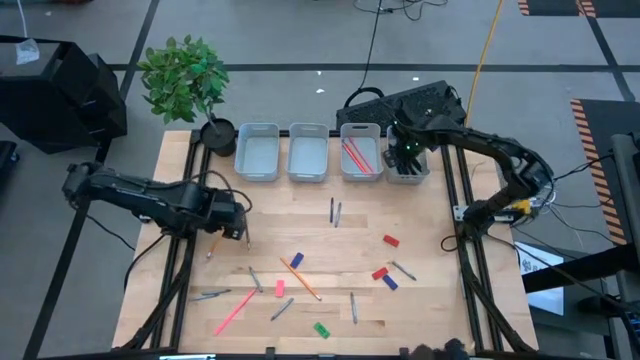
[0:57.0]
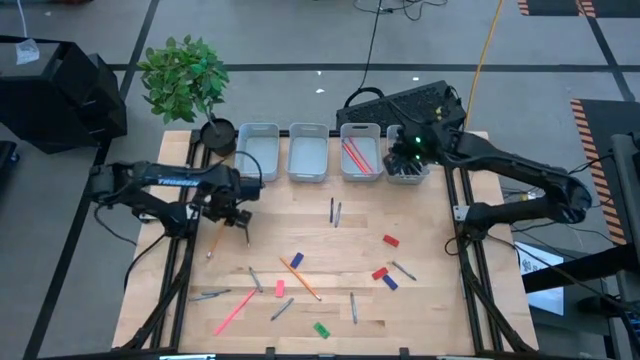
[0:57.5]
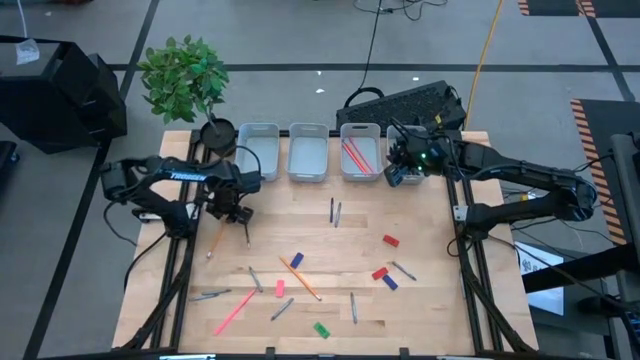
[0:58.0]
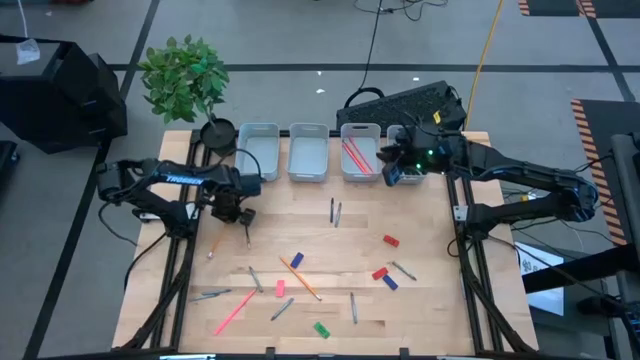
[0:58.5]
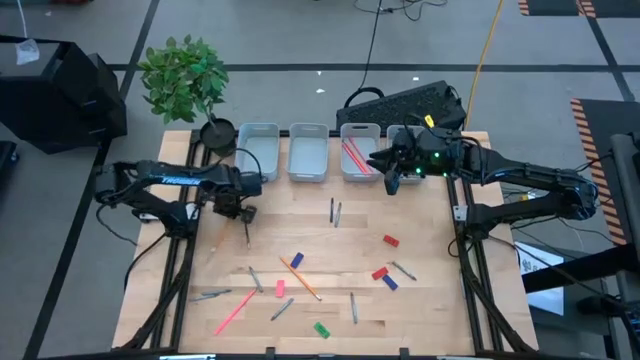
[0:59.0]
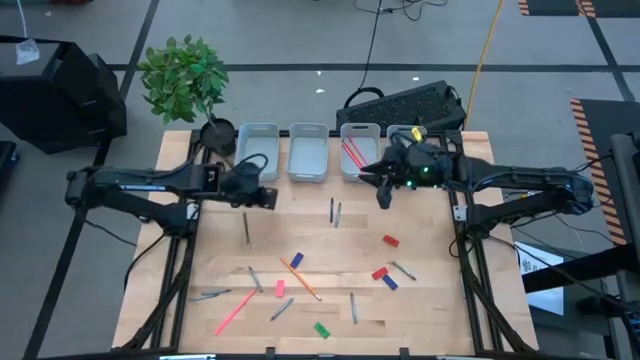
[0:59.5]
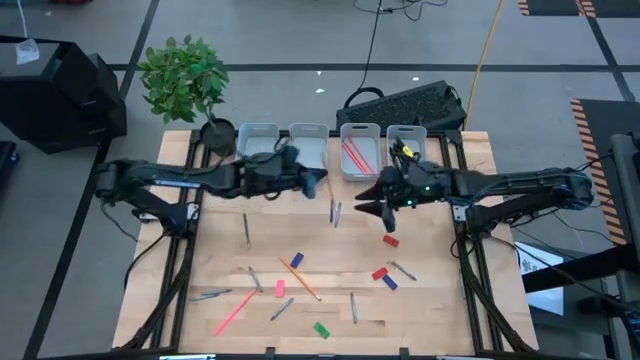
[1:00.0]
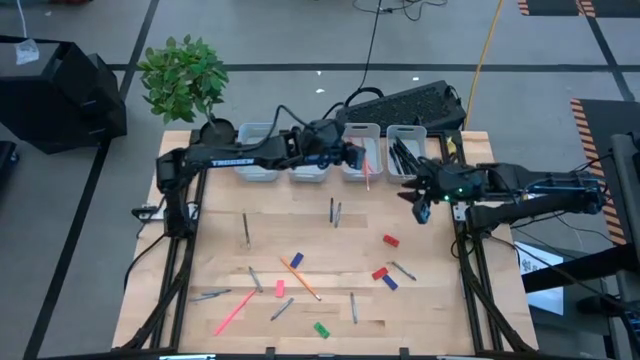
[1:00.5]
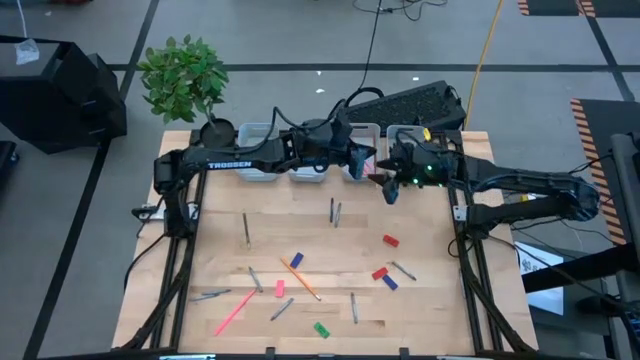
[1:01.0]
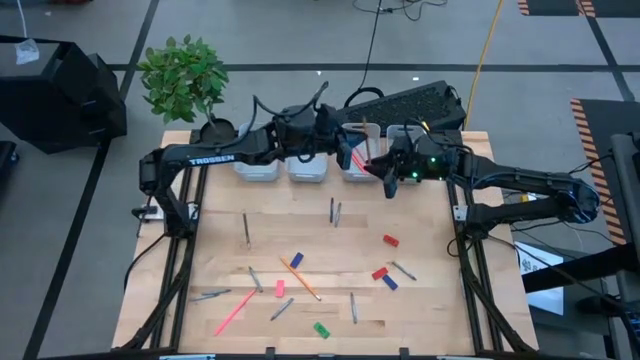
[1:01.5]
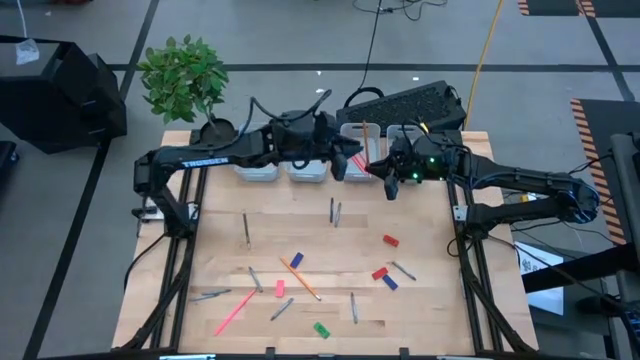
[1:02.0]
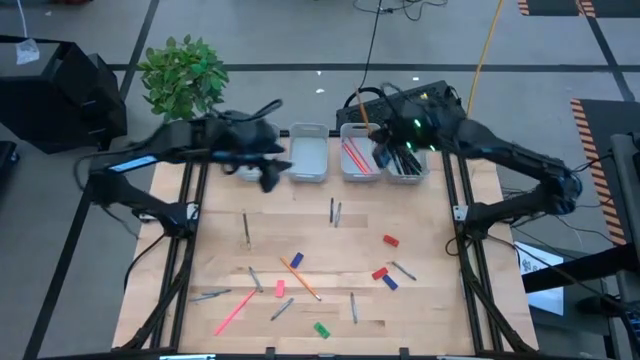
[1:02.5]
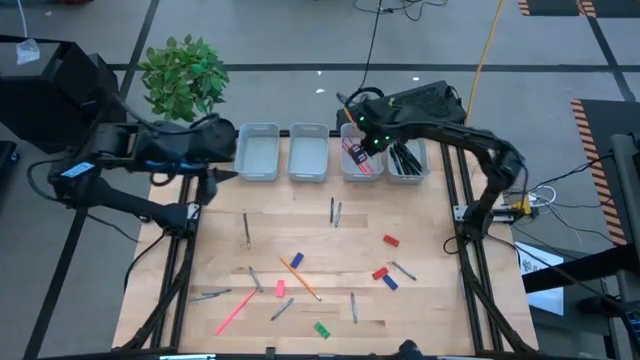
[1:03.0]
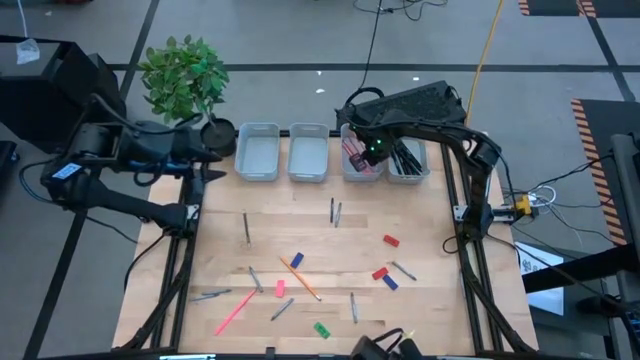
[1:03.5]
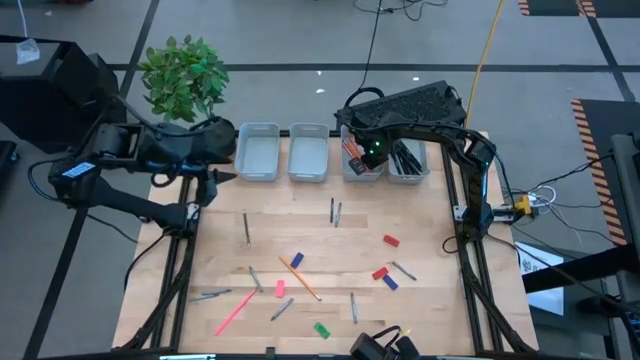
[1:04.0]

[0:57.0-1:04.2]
Task: Sort crayons/erasers/pens/pencils in bins
Put the orange pencil into the middle right gray bin

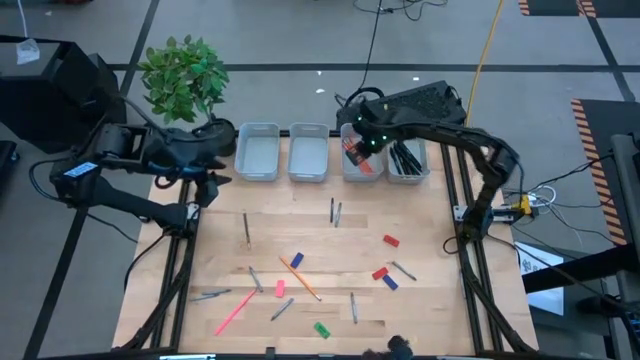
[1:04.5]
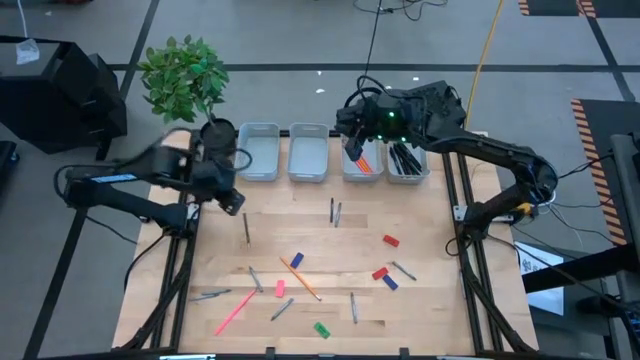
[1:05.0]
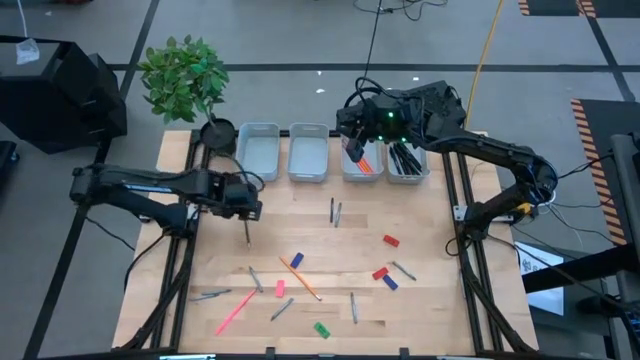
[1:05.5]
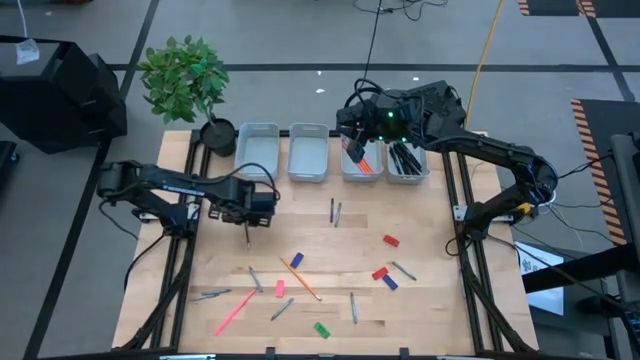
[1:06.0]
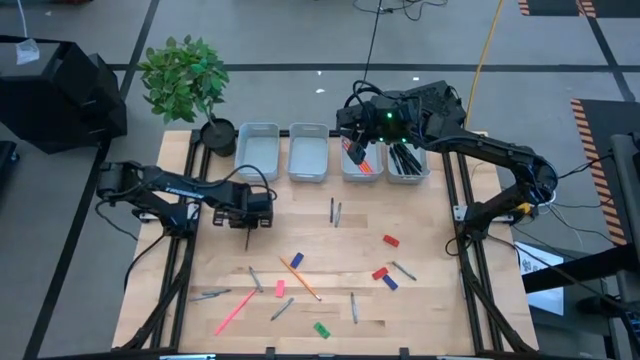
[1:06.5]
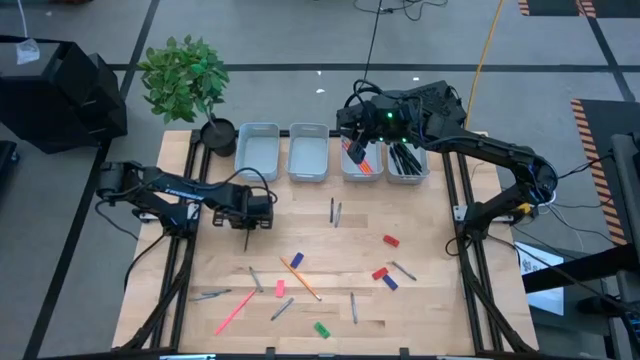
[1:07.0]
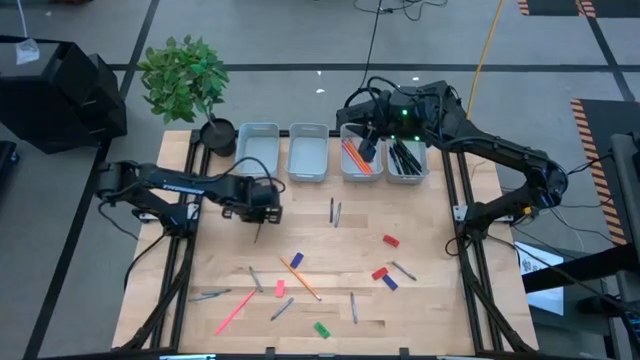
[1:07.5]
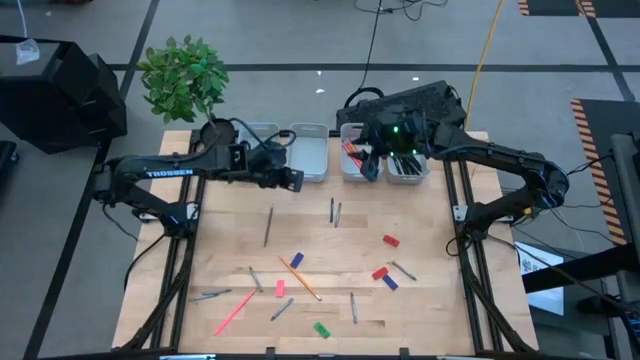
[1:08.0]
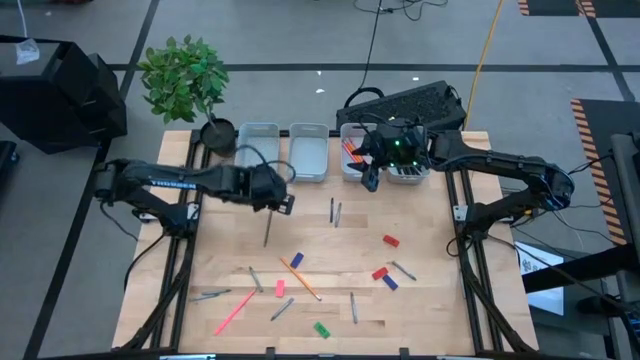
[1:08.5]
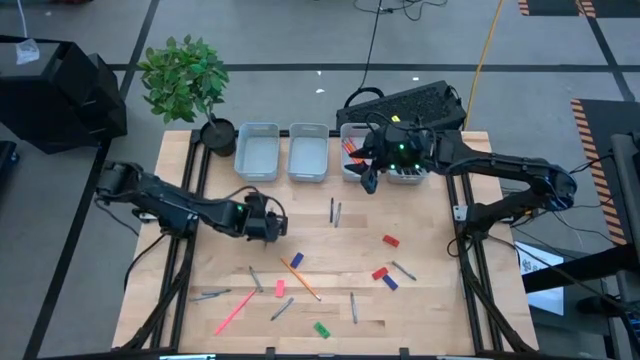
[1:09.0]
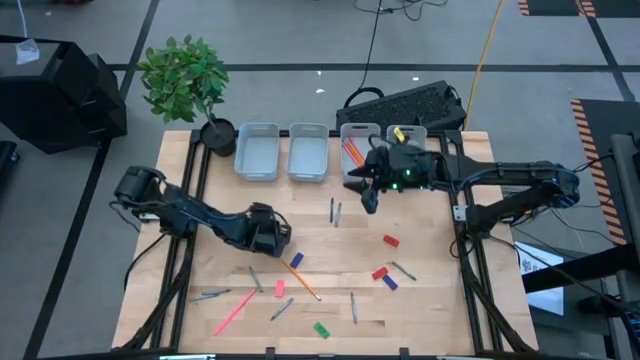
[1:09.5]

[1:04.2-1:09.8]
Put the black pencil into the middle right gray bin

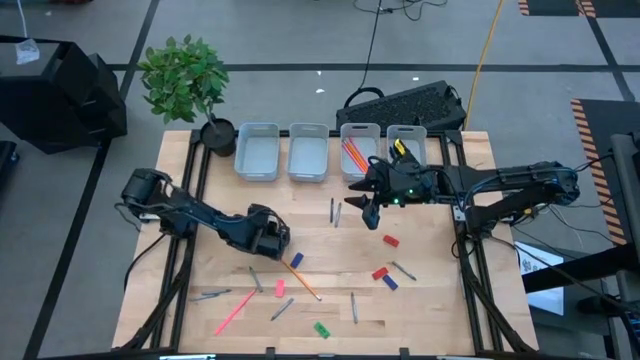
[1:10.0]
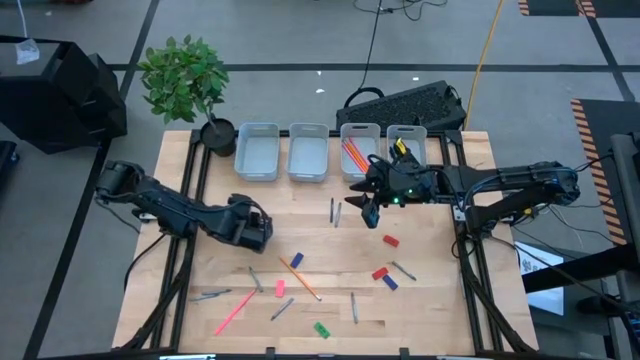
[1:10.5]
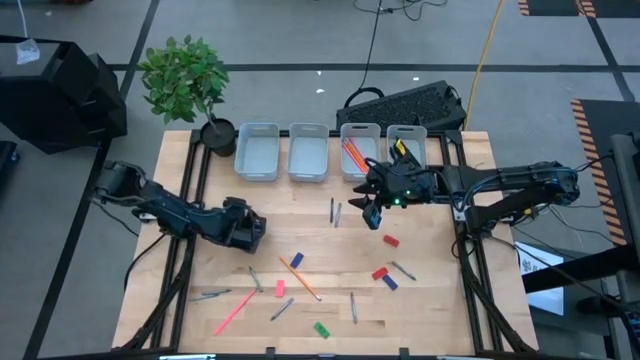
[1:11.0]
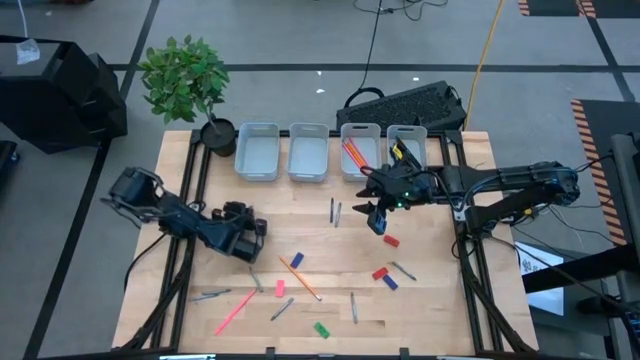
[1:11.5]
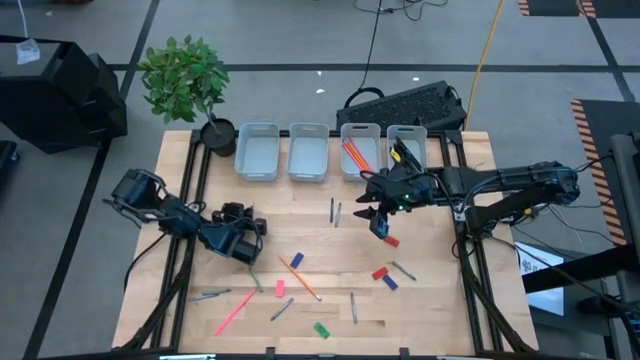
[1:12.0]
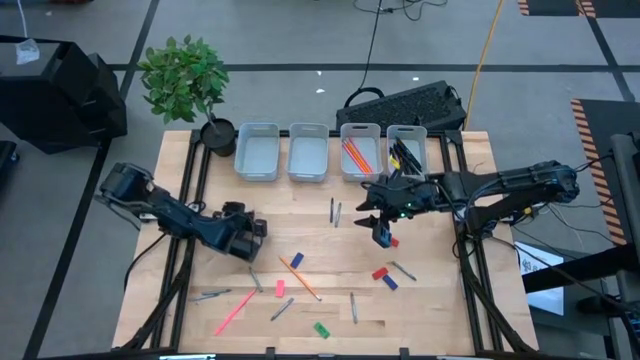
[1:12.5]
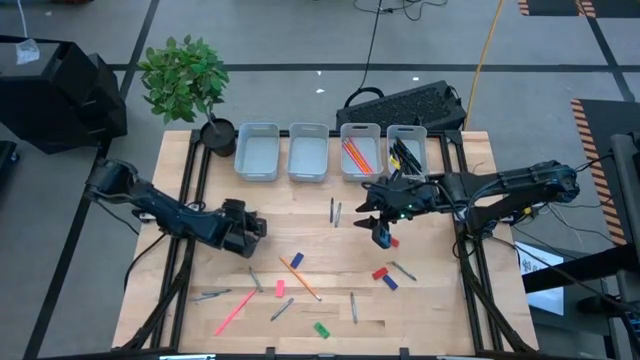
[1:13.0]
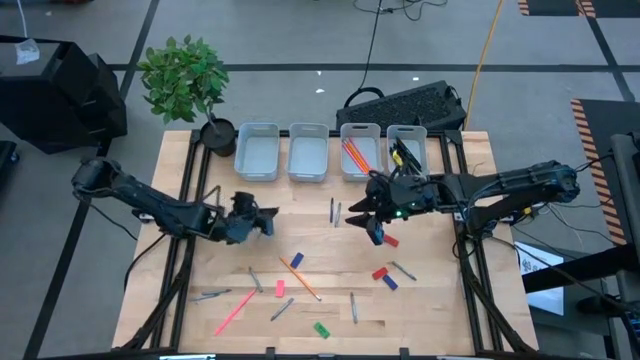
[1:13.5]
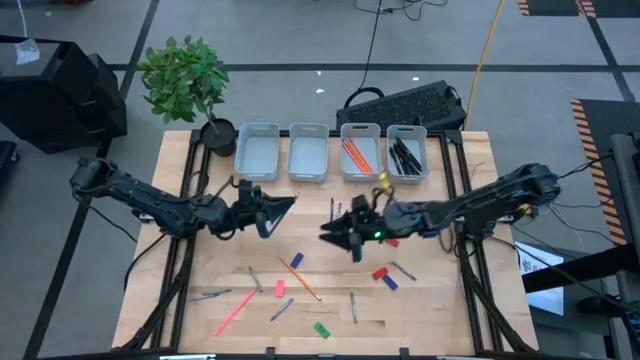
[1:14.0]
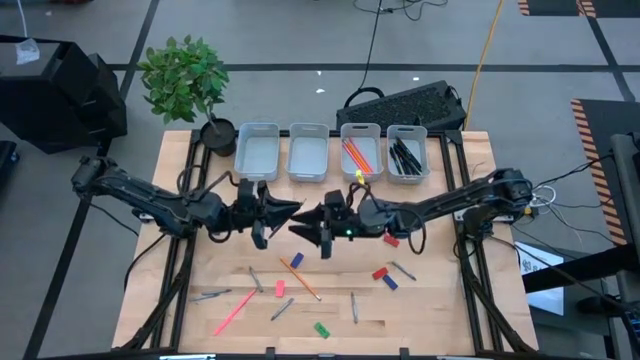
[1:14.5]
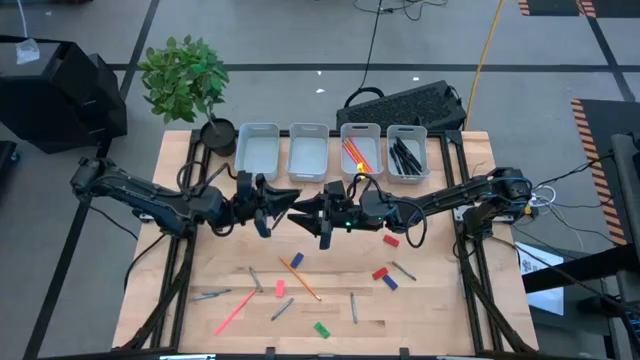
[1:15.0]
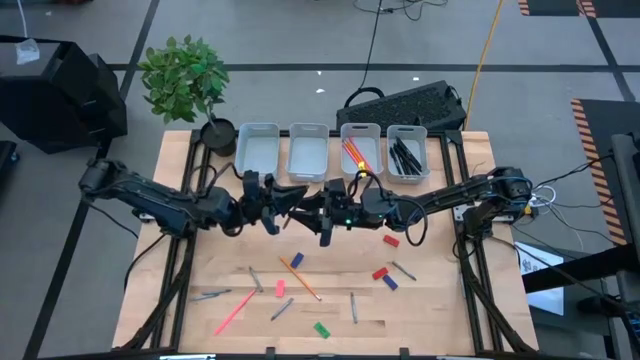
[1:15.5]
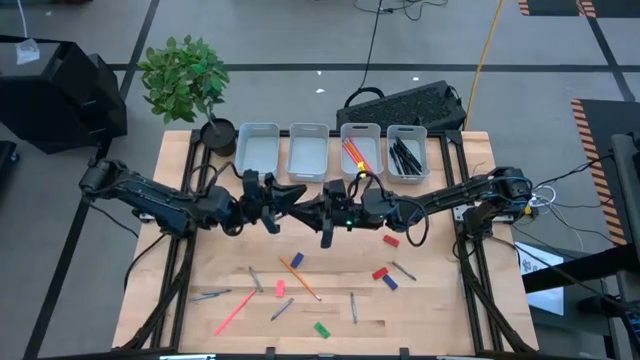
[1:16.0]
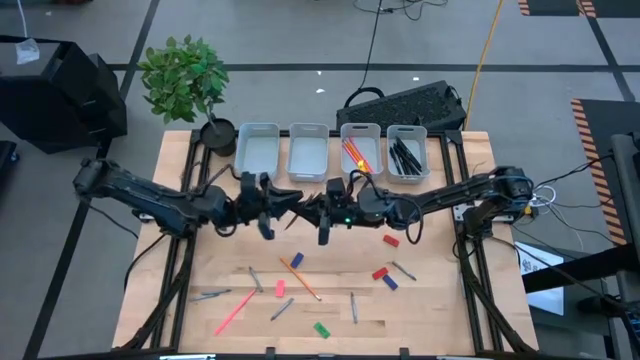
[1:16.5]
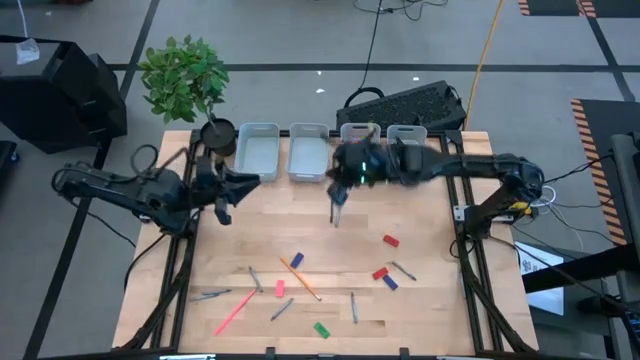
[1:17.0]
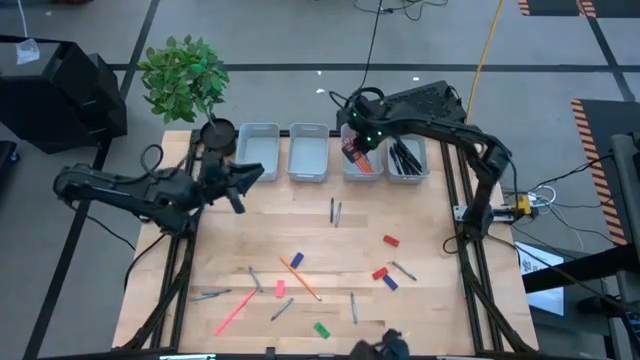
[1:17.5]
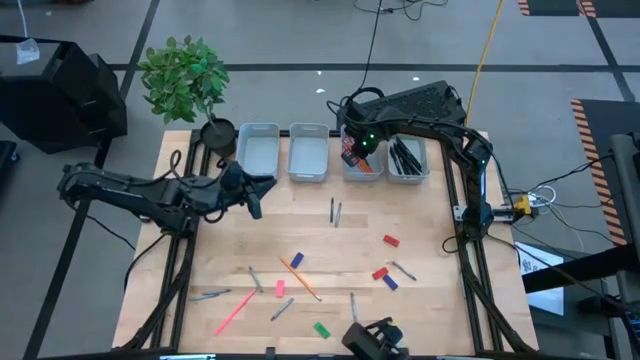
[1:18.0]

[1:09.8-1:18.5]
Put the black pencil into the middle right gray bin
